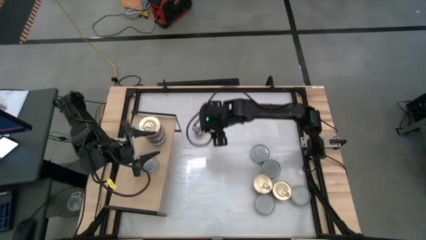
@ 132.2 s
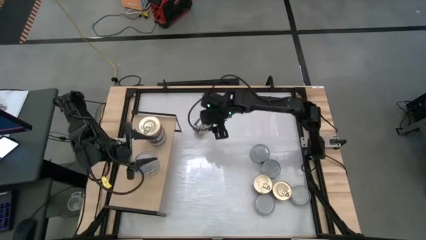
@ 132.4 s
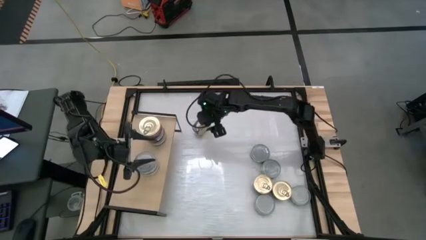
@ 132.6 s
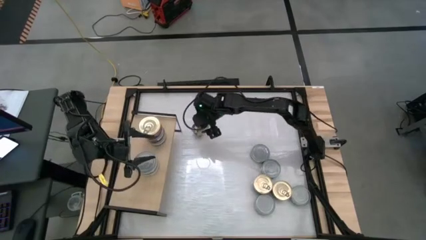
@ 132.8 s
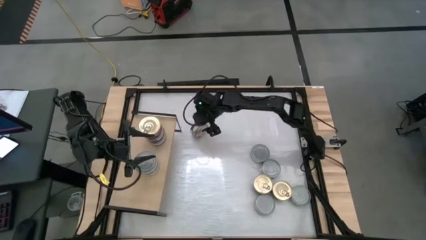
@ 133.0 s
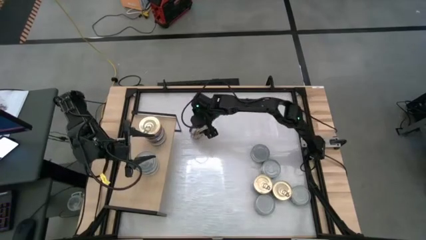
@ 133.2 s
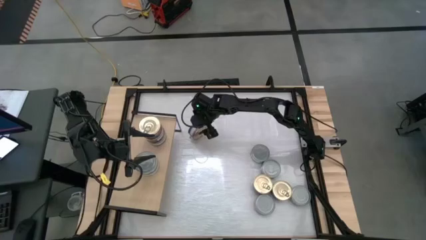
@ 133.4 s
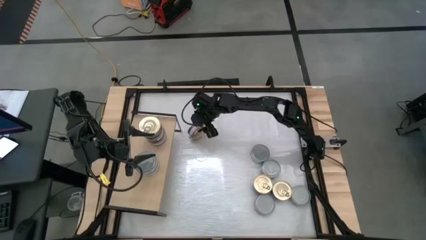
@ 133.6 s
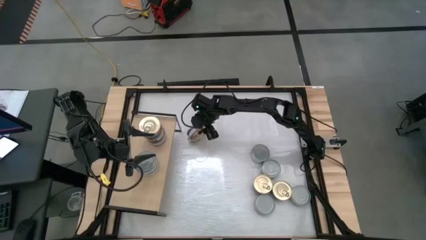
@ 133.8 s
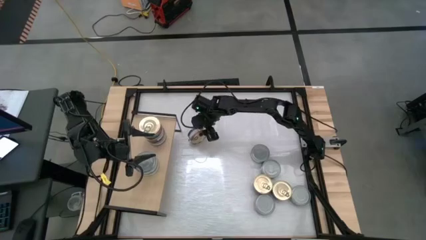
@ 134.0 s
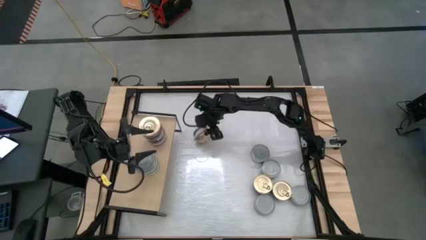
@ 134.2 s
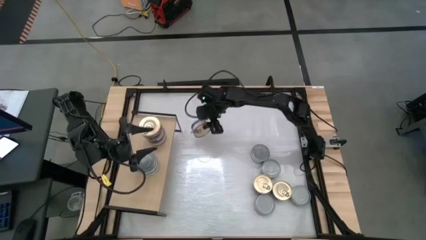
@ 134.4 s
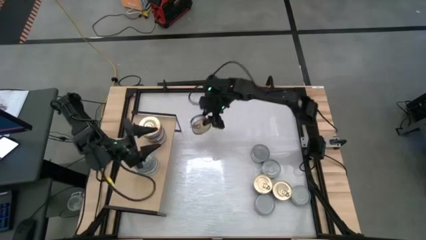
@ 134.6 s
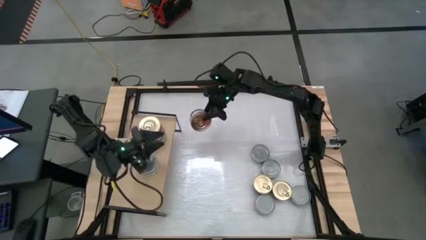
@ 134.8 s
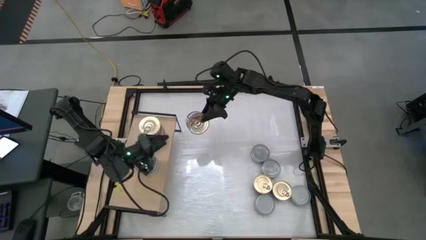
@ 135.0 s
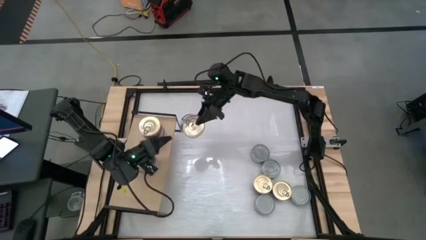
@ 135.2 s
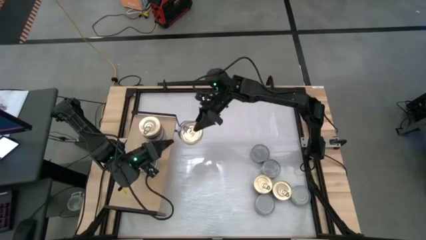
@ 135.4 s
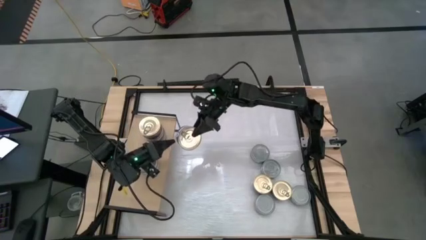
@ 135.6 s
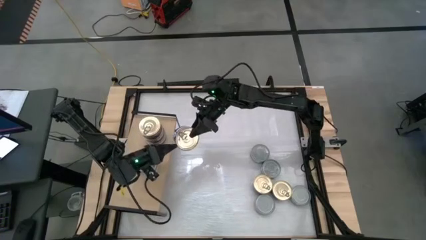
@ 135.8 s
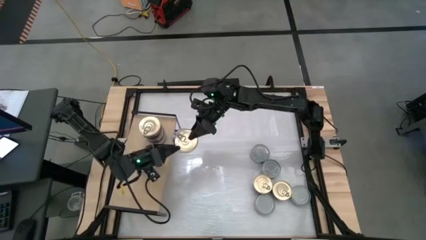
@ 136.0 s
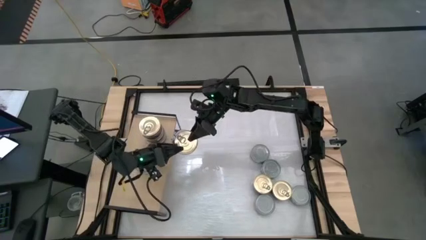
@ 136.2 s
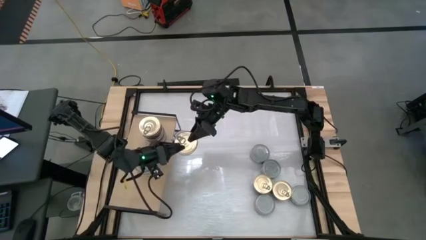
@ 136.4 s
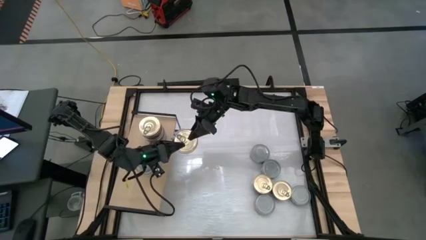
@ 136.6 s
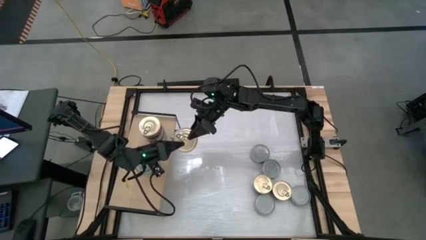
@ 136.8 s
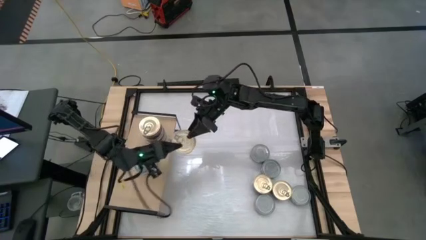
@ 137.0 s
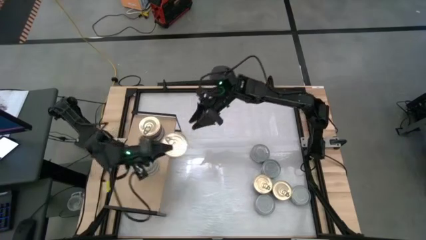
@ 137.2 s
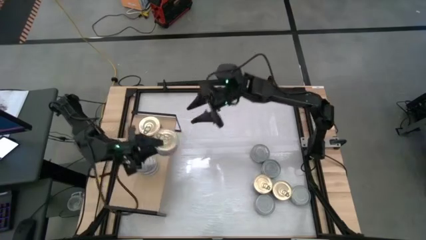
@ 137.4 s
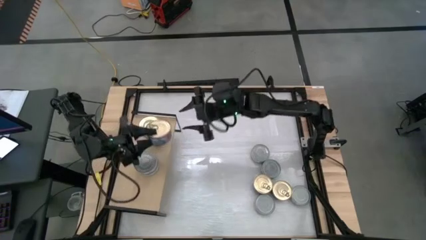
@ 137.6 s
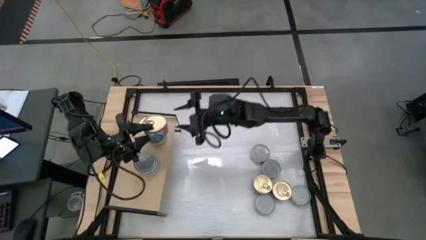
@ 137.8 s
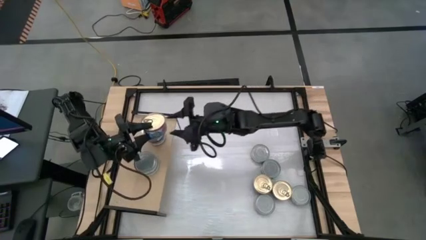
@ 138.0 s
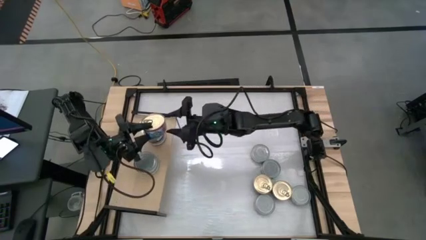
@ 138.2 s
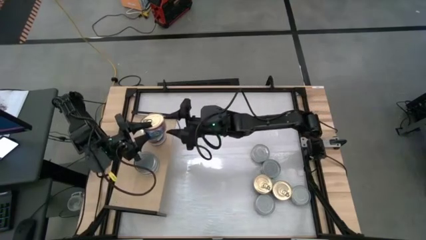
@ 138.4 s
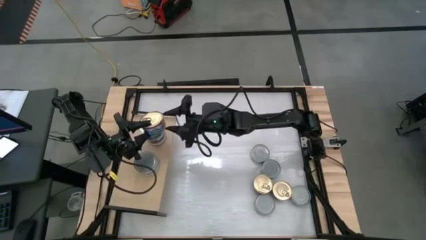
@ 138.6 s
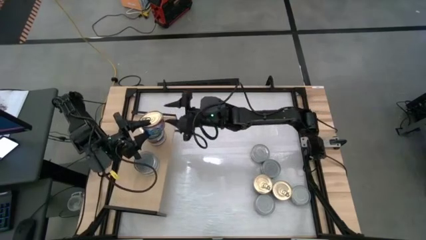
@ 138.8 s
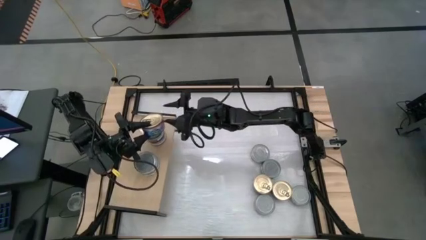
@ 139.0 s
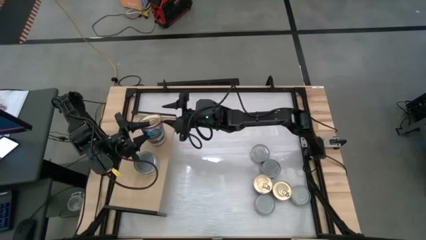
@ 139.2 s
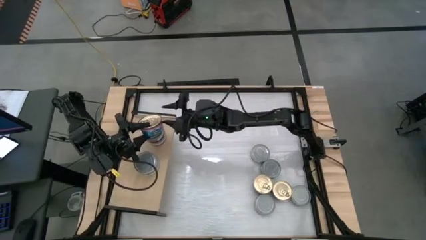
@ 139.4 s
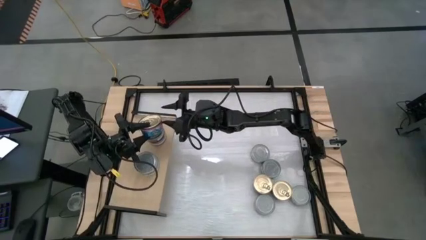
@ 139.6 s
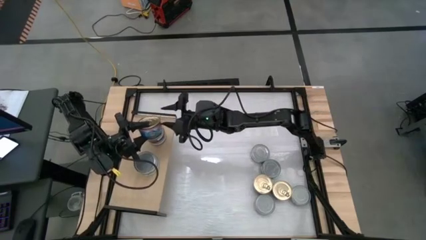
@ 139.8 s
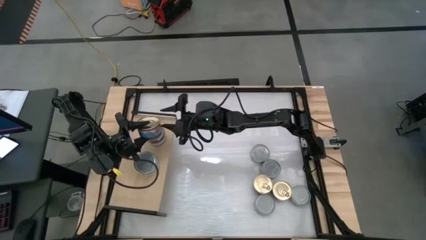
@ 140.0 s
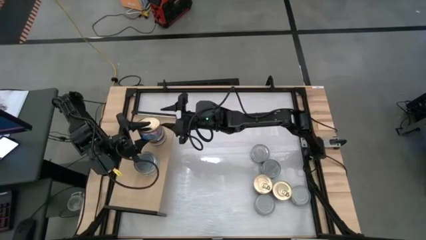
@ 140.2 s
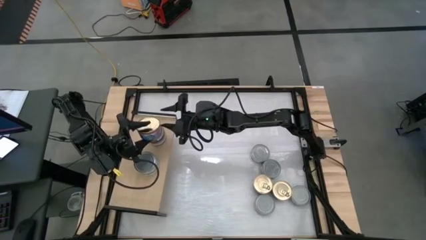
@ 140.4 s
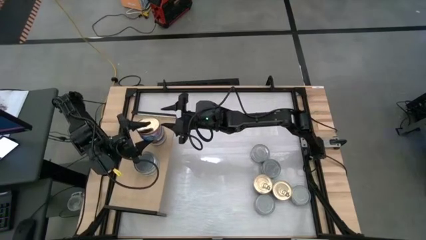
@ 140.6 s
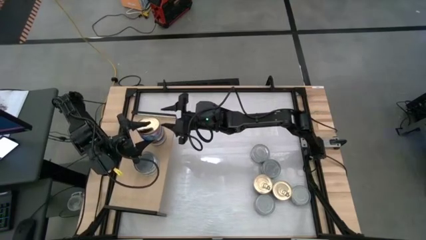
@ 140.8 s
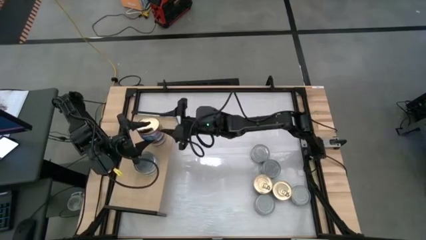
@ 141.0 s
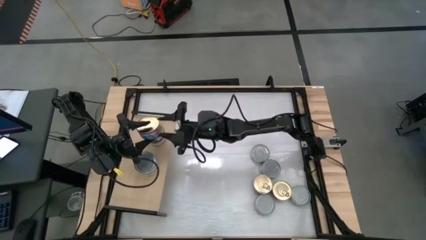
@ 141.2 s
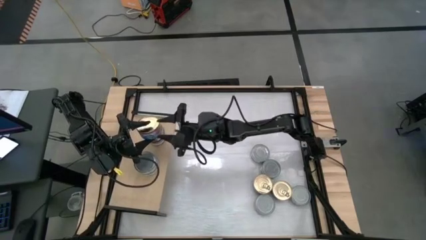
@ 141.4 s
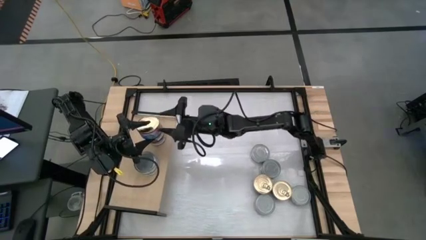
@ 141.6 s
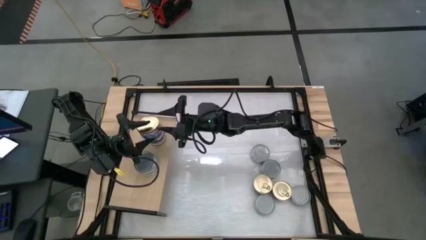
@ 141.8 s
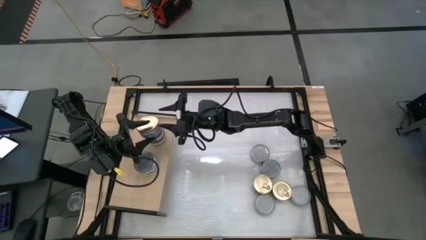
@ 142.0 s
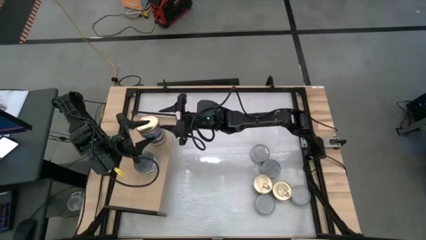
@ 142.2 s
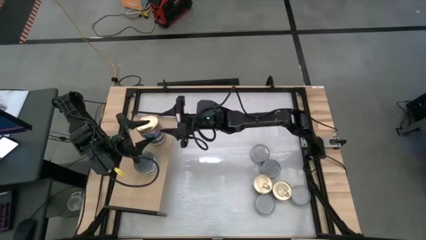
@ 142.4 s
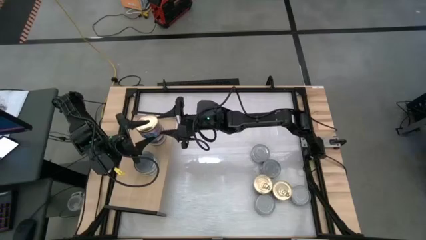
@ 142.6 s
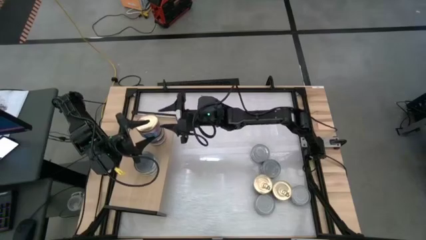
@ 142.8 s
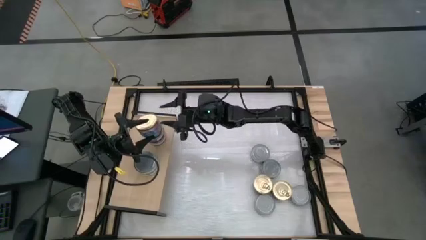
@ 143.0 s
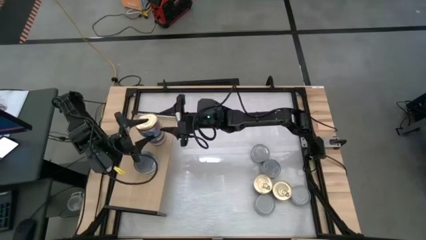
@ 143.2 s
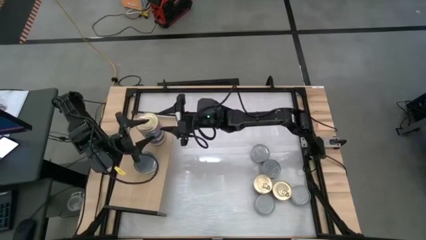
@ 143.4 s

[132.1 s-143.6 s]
Task: Stack canned seafood by type on shelf
Stack the blue tuna can on top of the blue tuna can on the shelf

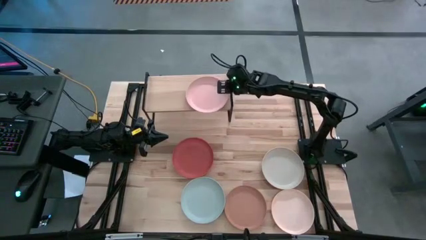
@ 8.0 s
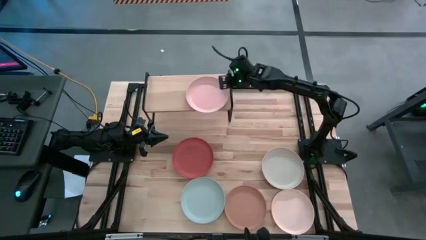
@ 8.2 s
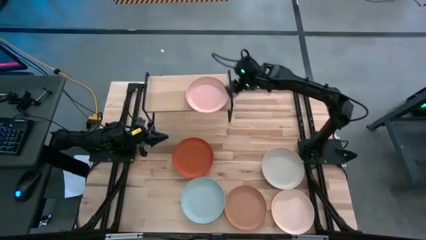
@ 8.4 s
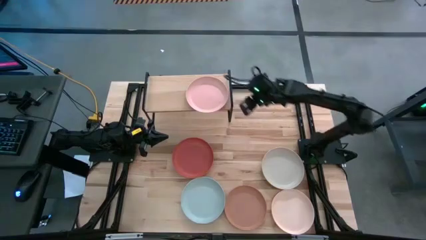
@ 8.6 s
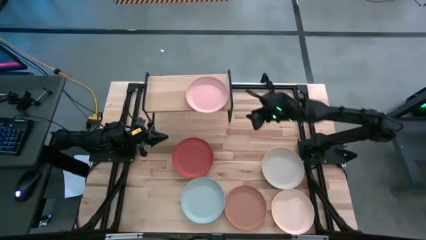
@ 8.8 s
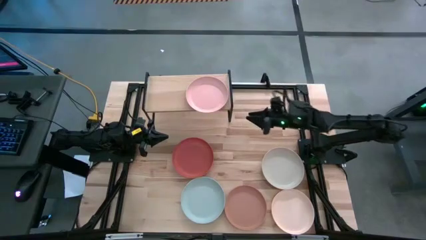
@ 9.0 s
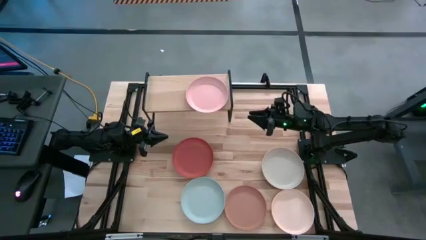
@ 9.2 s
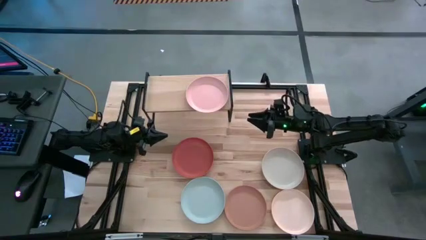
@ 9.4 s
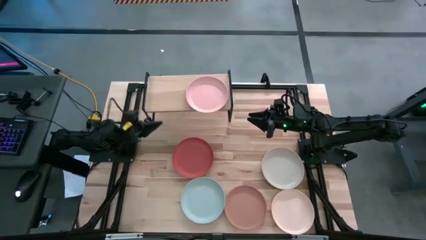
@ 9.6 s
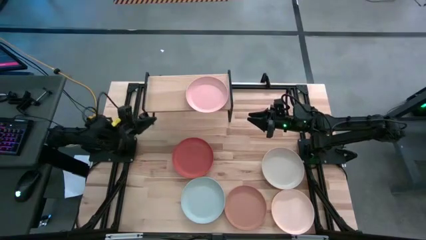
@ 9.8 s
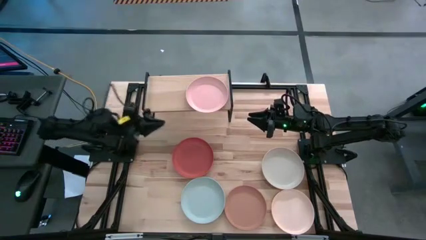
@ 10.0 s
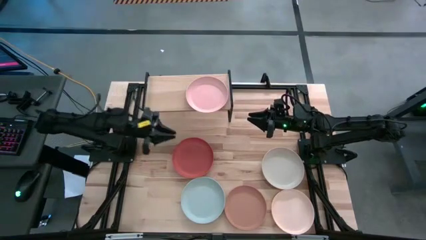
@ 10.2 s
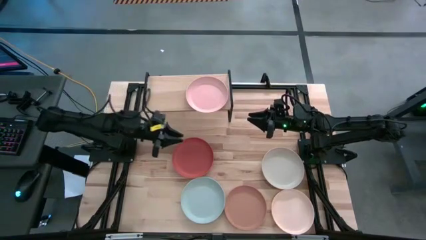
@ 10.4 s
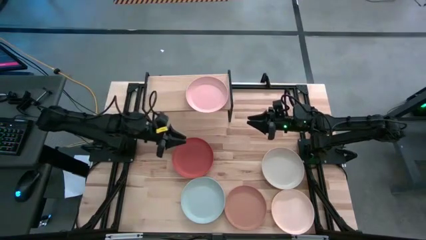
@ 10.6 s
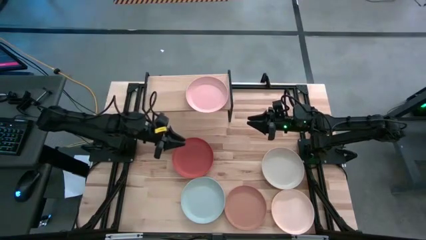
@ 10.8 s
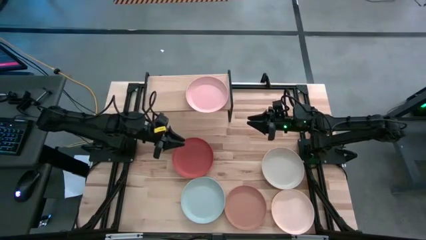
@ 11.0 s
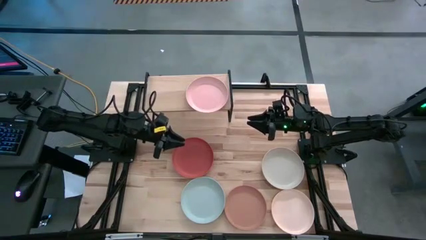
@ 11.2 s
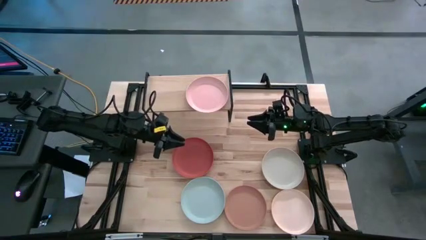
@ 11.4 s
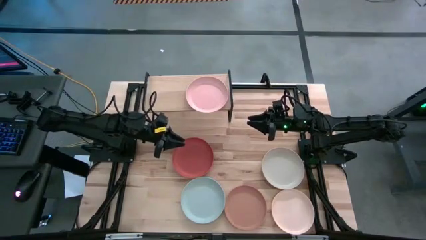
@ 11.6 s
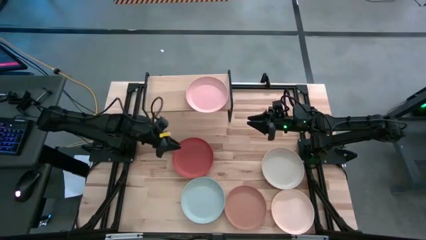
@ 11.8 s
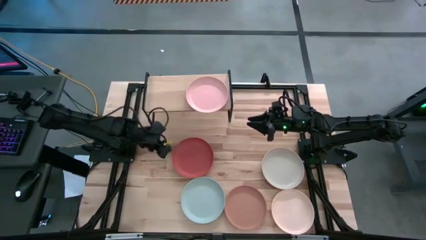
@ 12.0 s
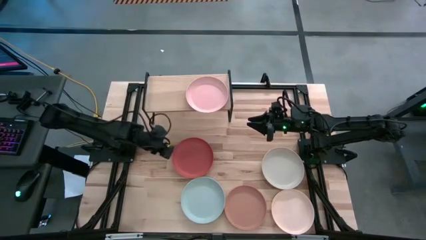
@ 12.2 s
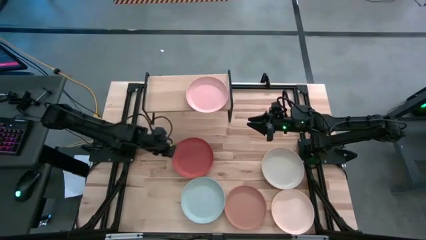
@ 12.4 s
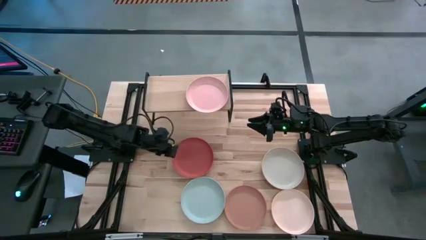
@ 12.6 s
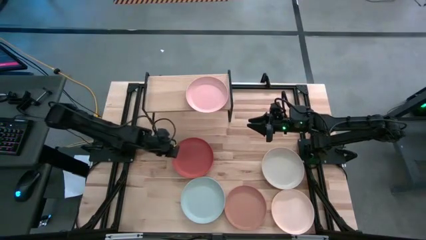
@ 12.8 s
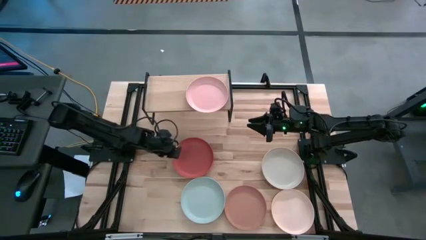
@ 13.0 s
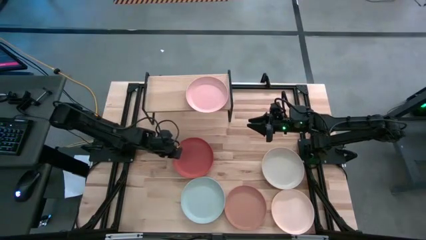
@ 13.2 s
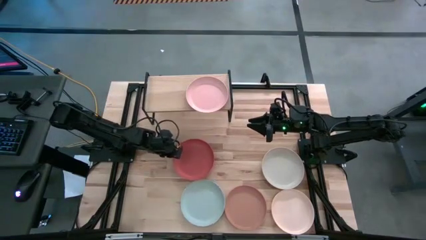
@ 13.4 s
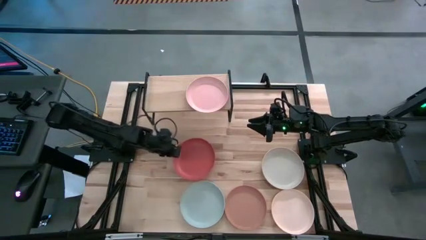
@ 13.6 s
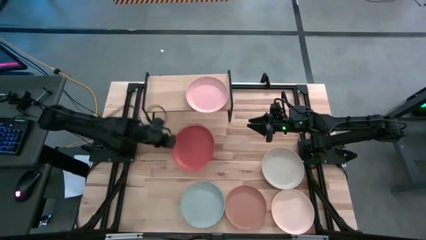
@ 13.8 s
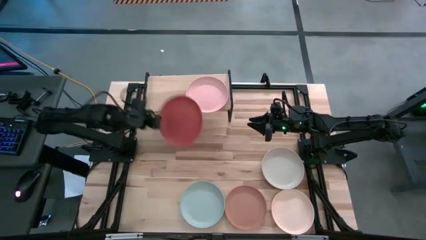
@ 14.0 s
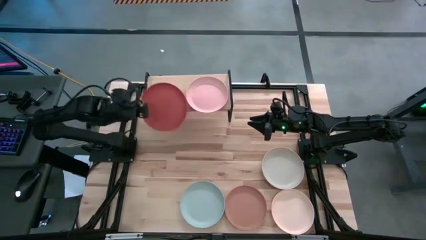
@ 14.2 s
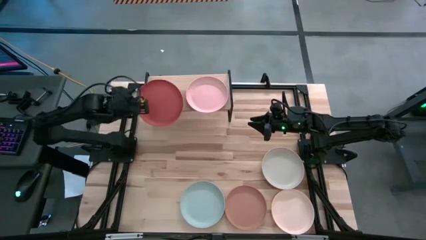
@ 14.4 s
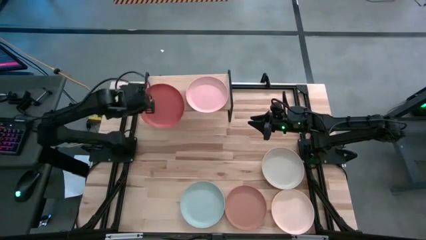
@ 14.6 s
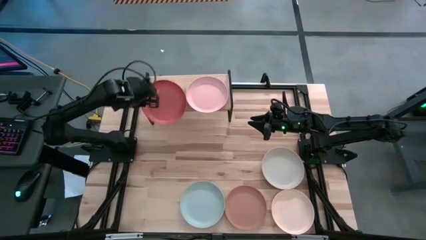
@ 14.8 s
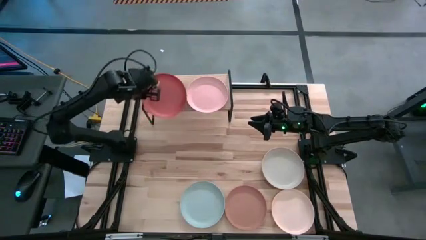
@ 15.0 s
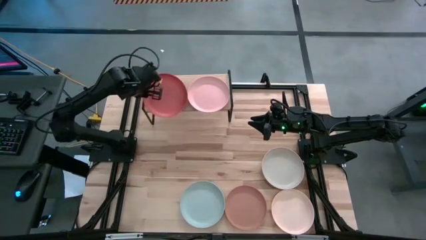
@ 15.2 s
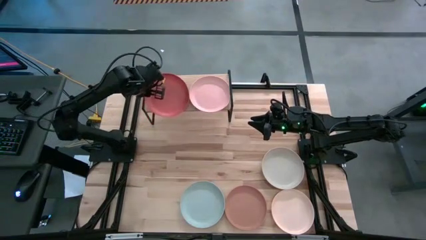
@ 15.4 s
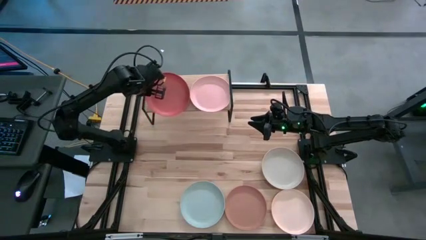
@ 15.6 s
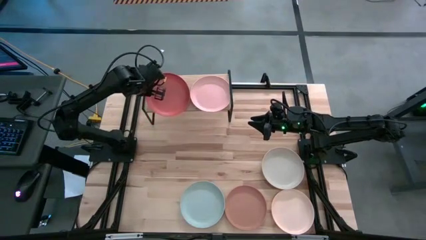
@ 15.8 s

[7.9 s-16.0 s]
Task: Place and stack plates onto a shelf
Put the orange plate on the shelf
